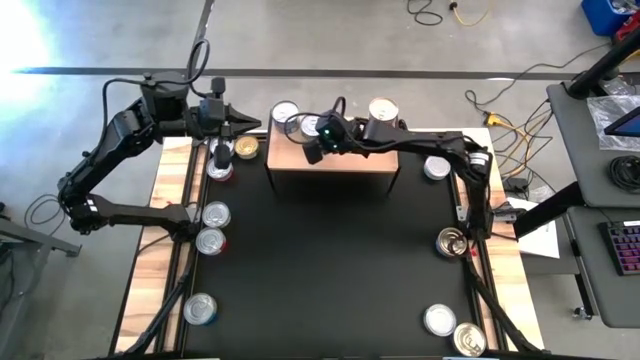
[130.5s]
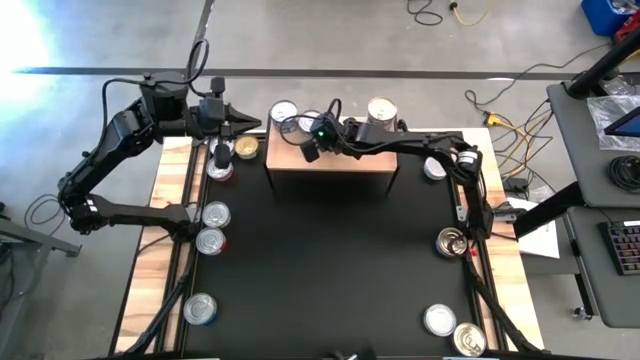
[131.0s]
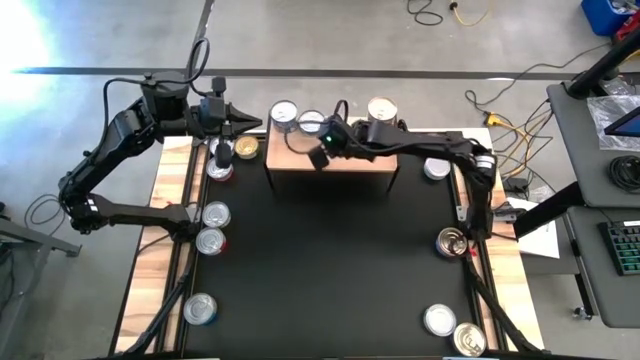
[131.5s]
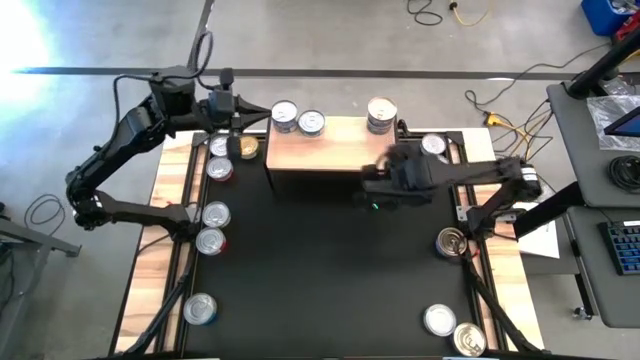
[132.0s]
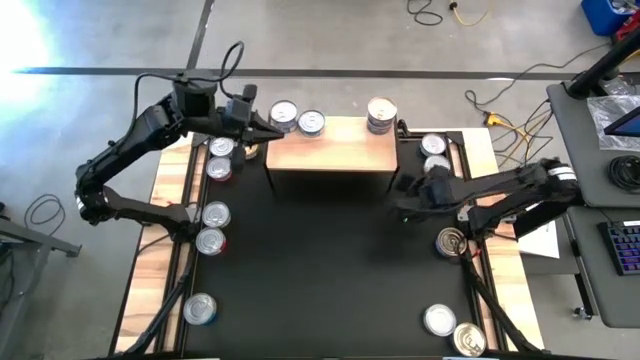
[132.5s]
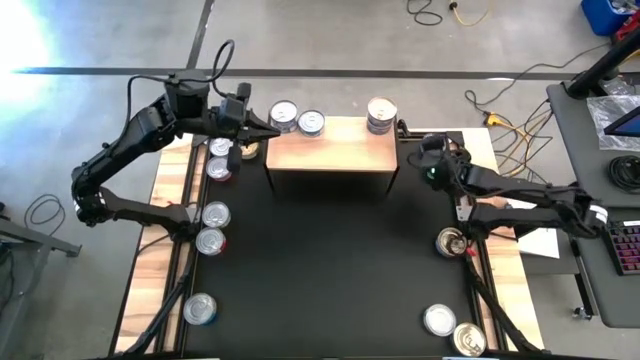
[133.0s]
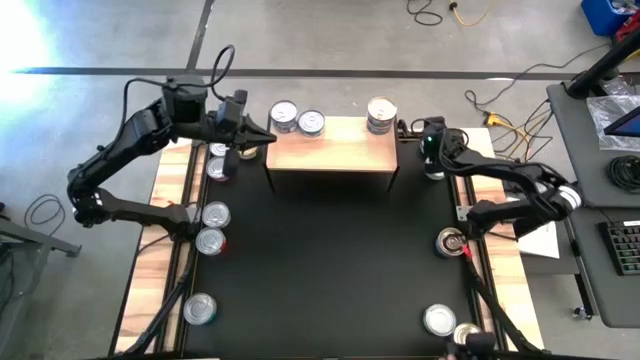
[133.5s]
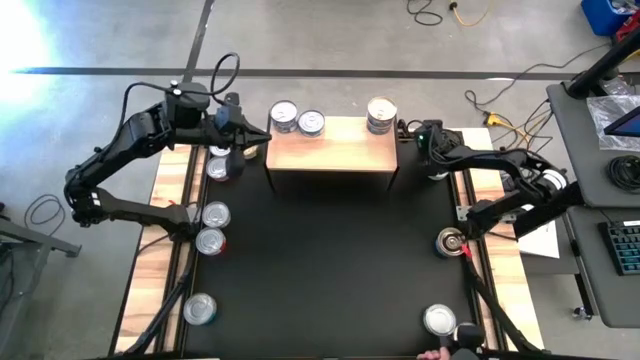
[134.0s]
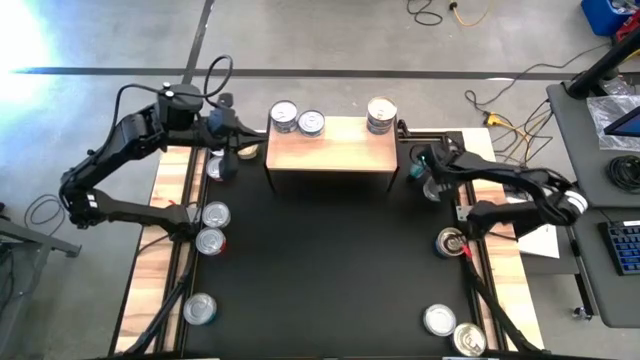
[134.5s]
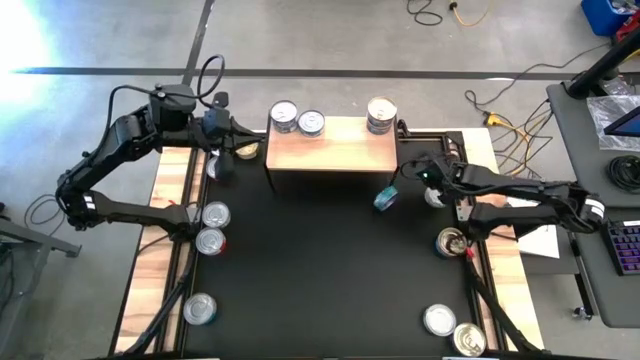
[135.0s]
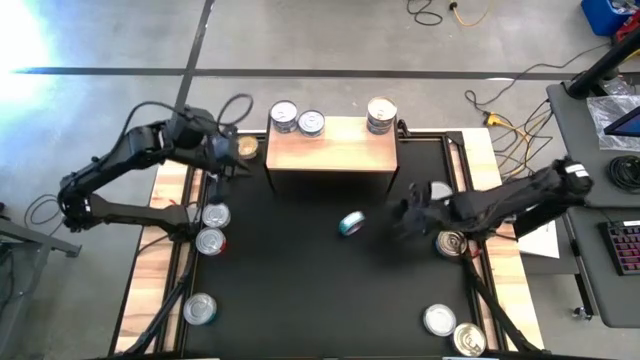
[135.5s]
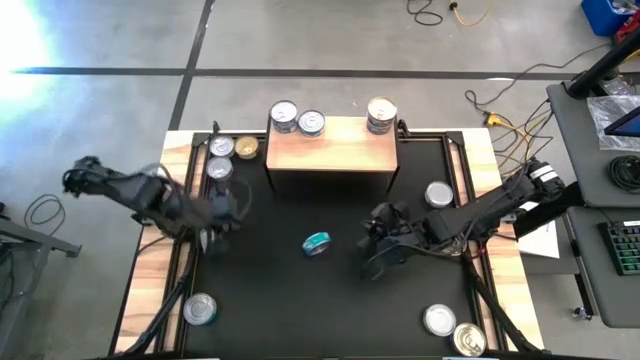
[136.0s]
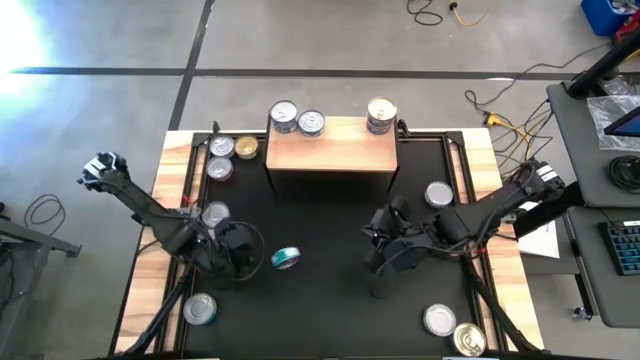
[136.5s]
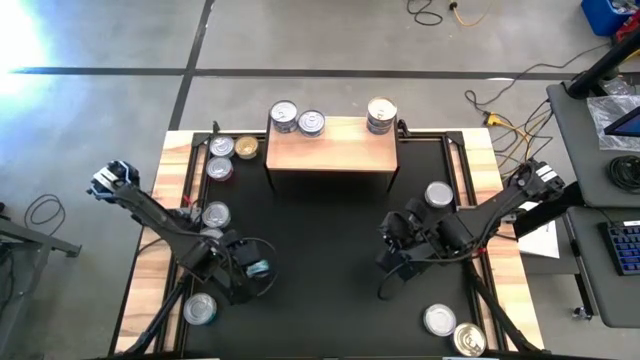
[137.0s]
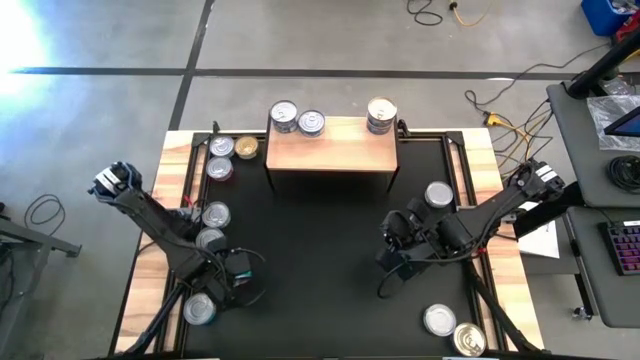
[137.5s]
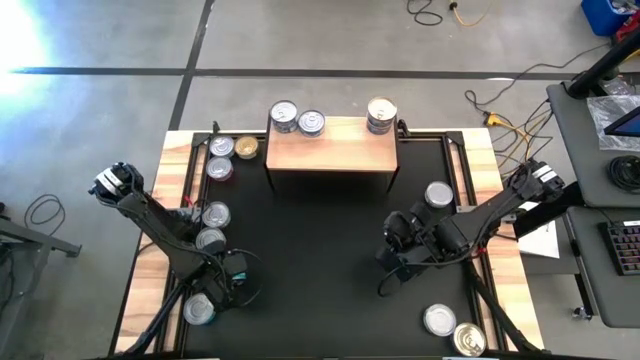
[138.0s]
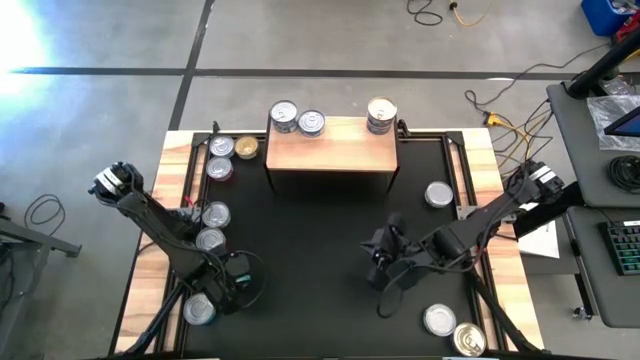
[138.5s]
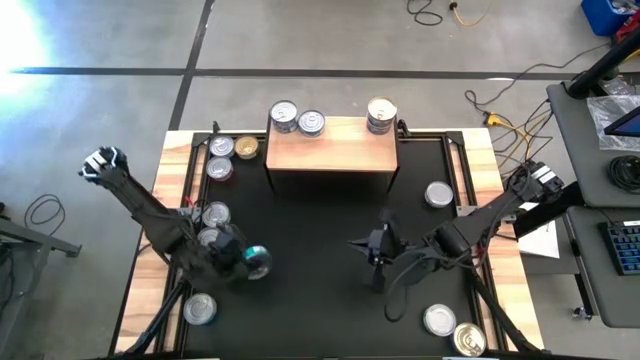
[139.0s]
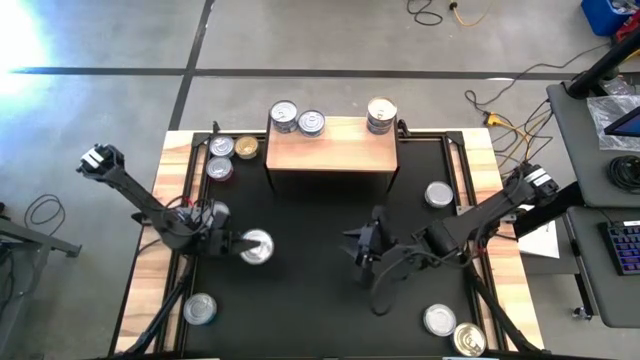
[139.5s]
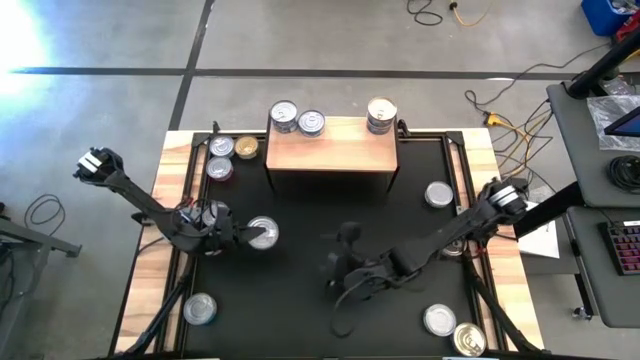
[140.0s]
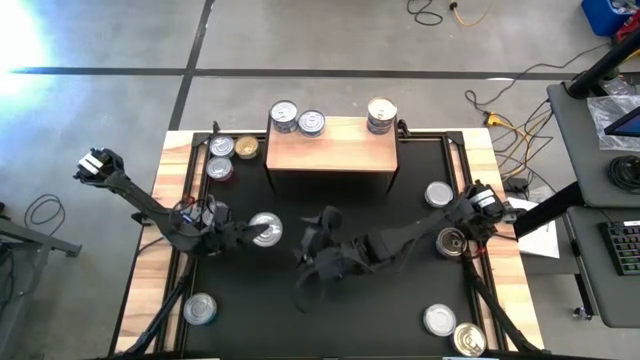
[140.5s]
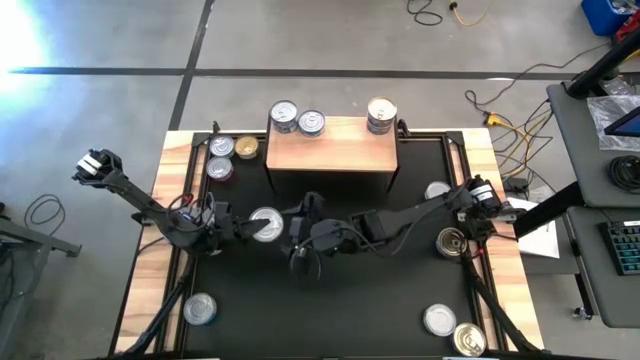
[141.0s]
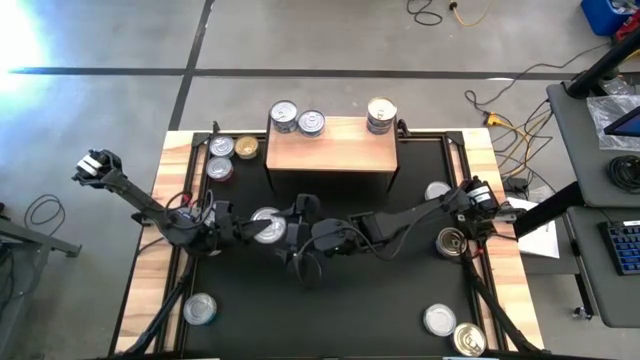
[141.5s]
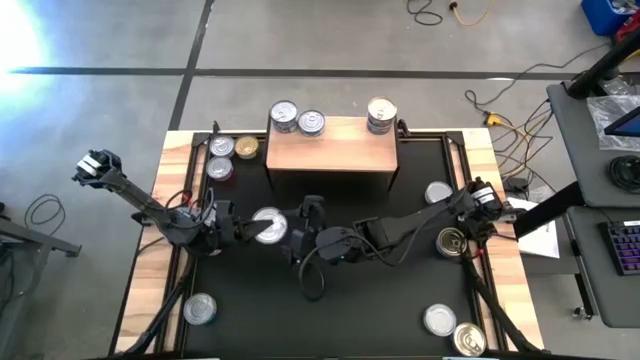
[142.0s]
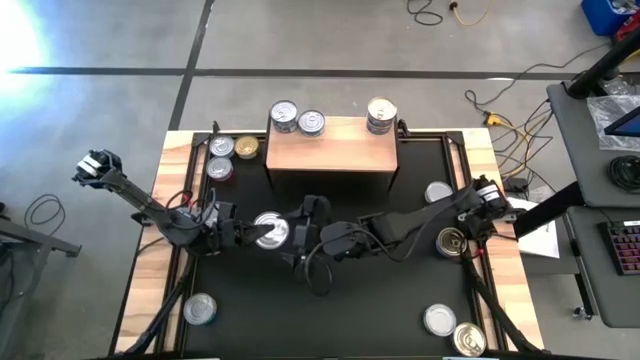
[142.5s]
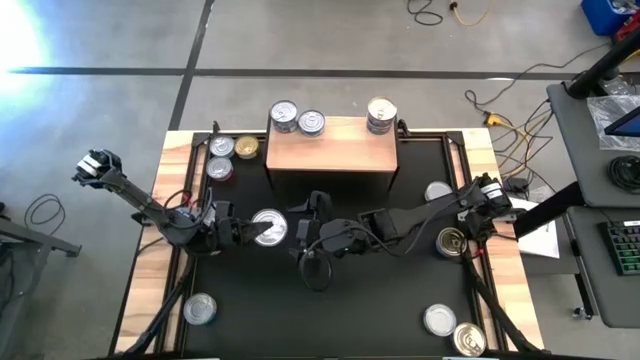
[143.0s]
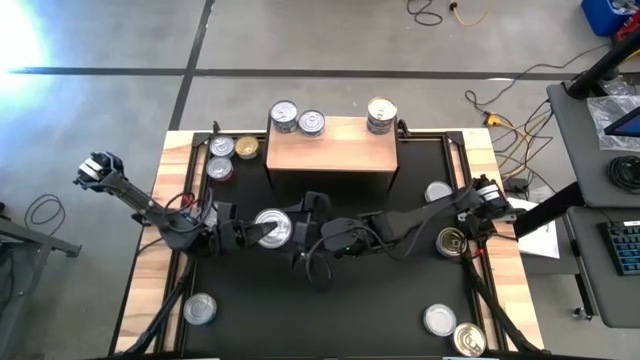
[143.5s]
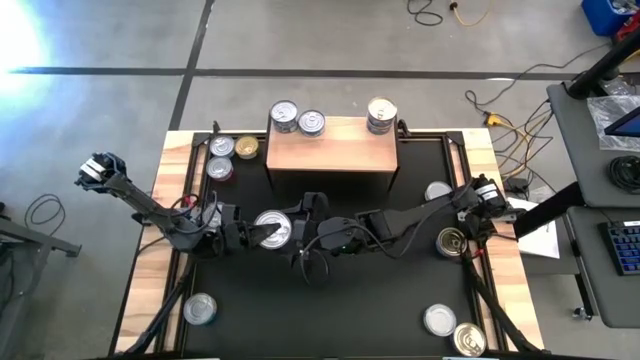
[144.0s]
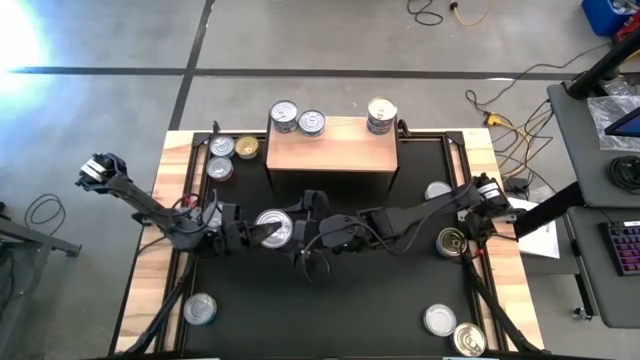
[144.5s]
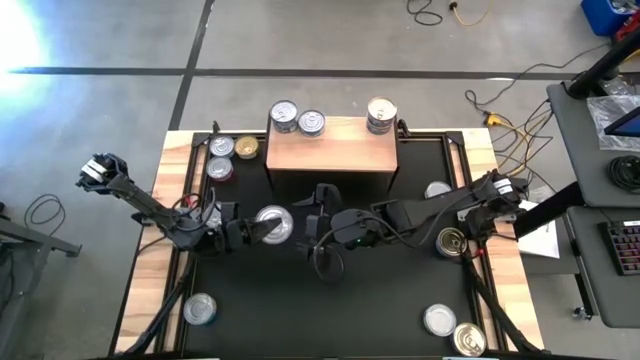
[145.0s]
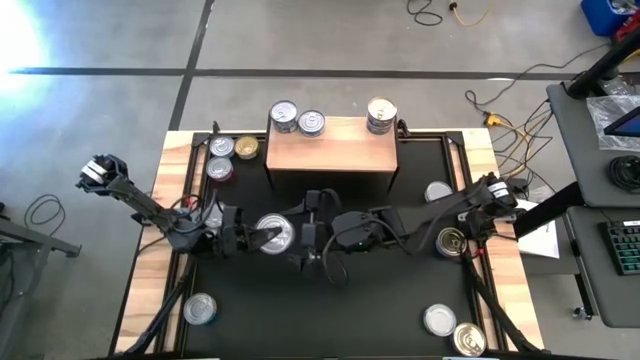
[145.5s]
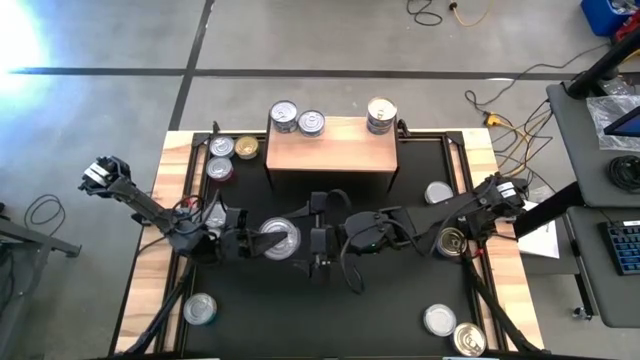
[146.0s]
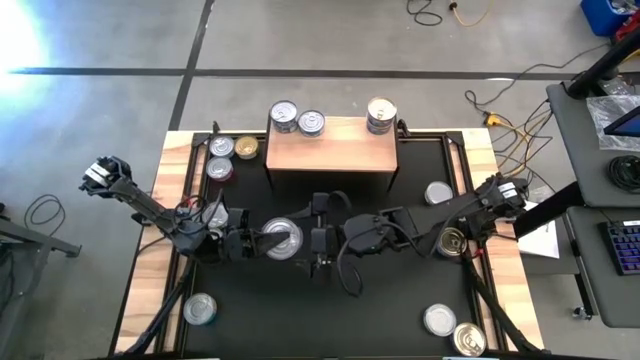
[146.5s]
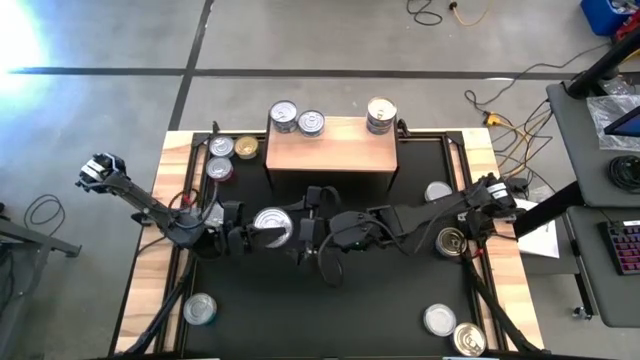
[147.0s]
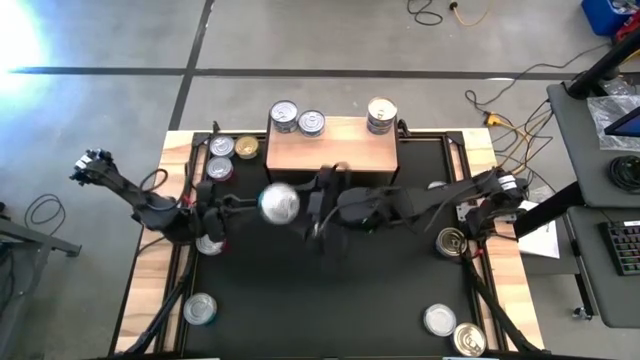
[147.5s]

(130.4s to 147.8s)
Task: Stack canned seafood by type on shelf
Stack the green-blue tuna can on the shelf

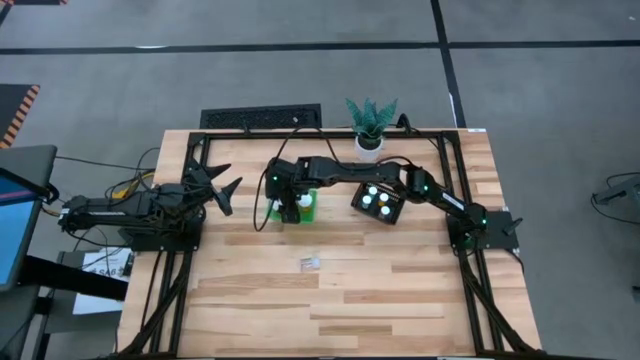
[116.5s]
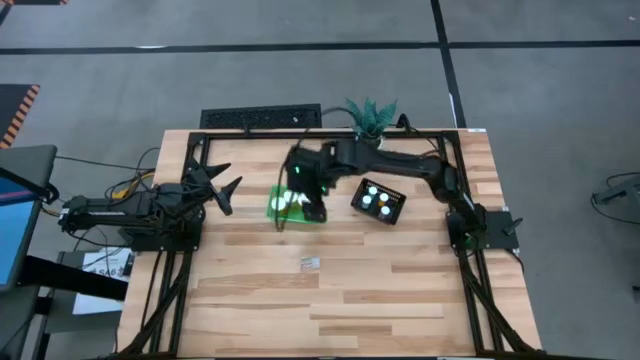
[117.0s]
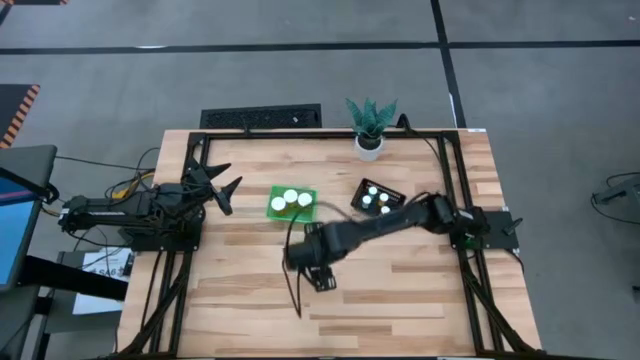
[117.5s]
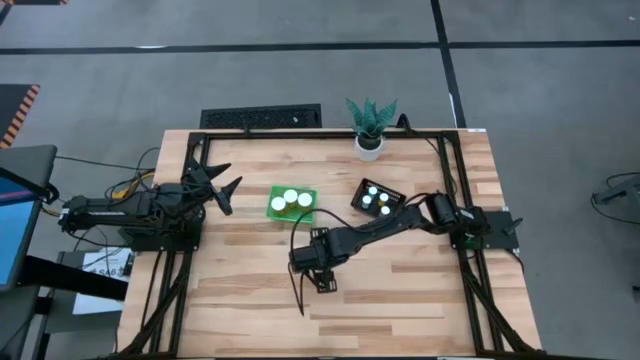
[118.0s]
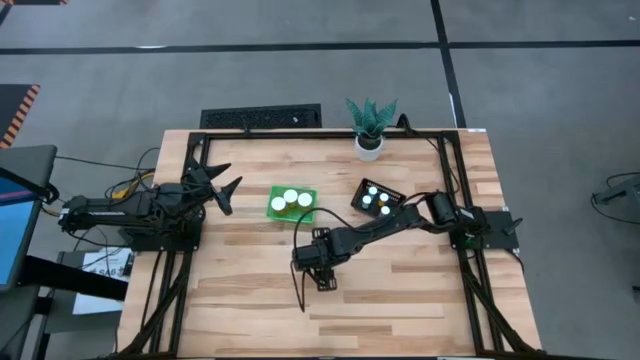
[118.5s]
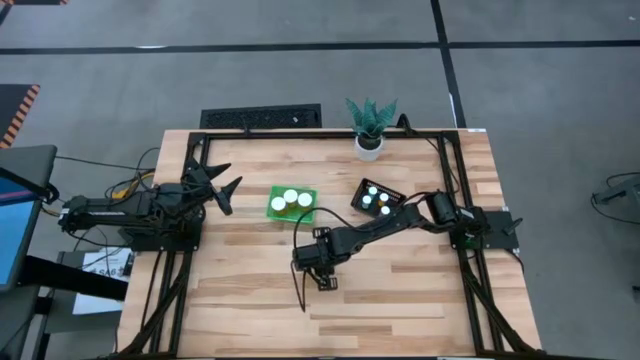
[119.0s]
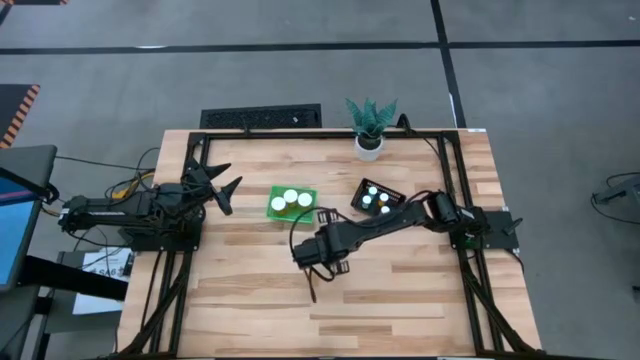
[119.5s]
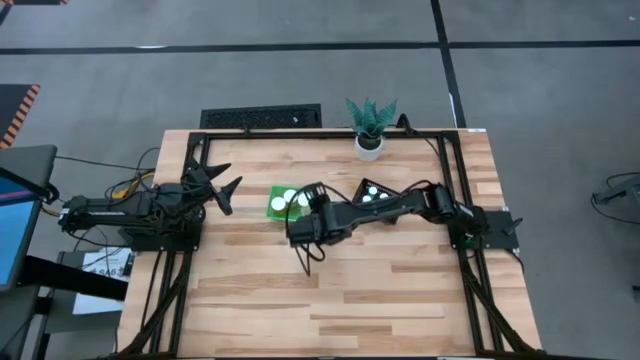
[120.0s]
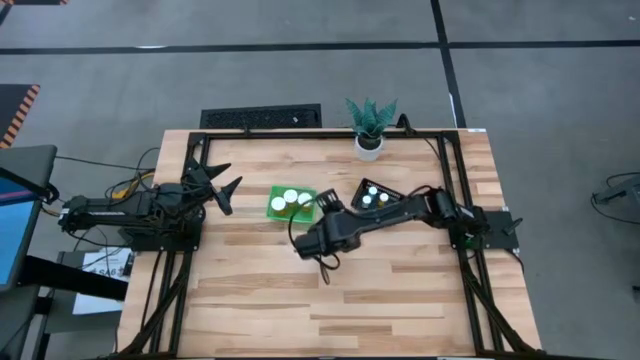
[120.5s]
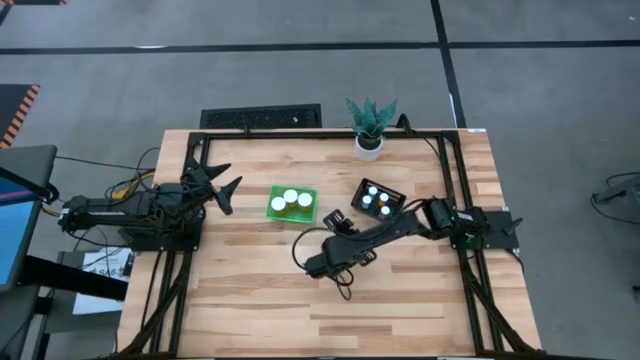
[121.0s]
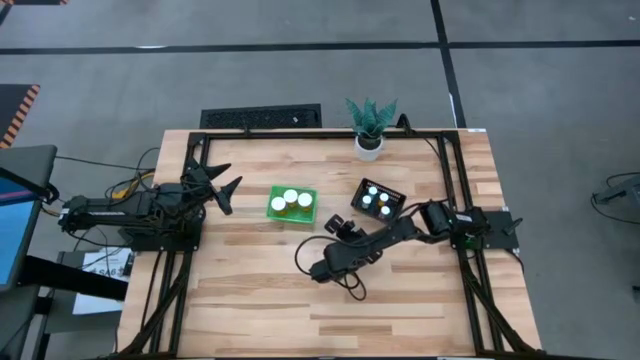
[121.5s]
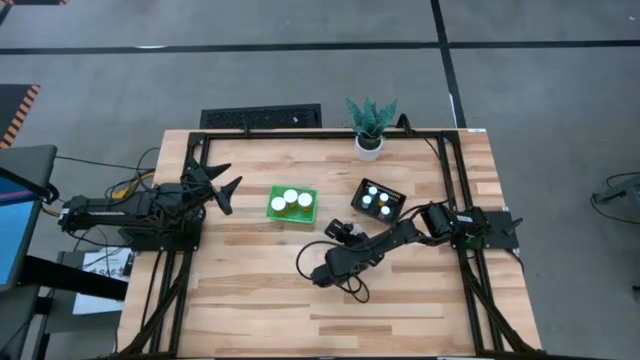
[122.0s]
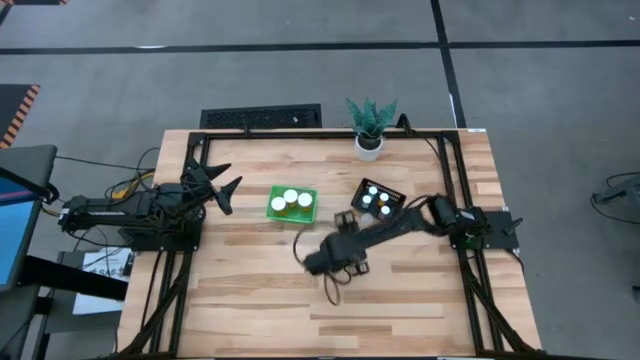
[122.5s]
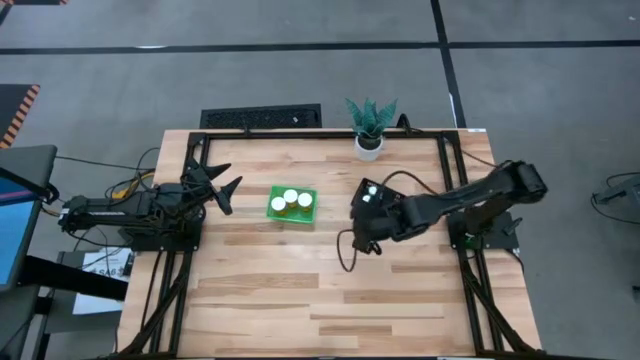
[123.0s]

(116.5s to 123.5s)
Task: Pick and place medicine bottles into bin by pill shape (circle, oval)
Put the transparent capsule bottle into the green basket
